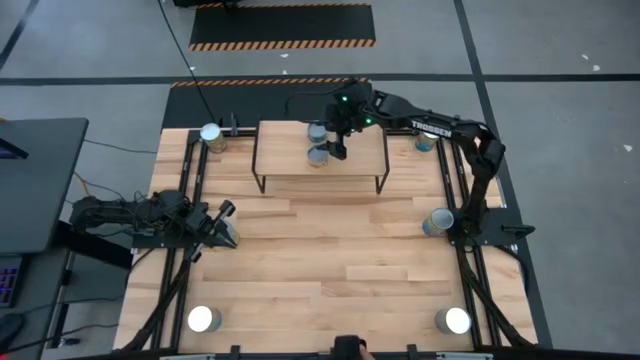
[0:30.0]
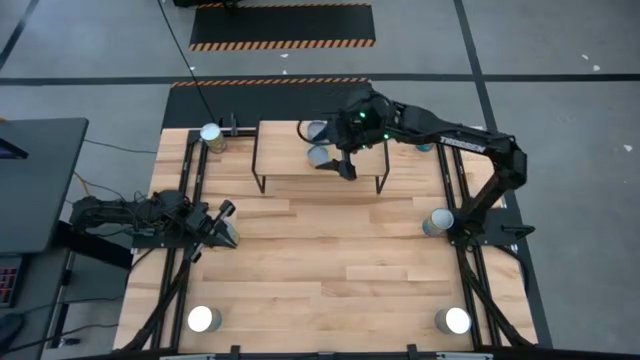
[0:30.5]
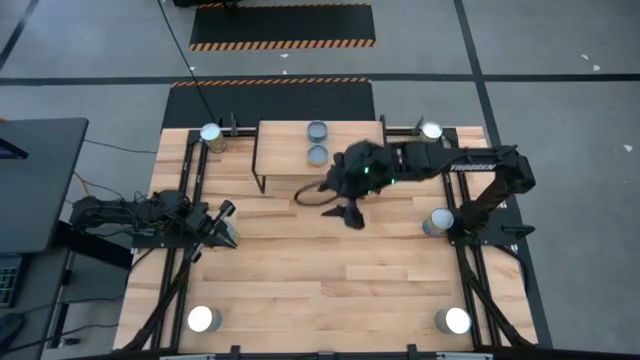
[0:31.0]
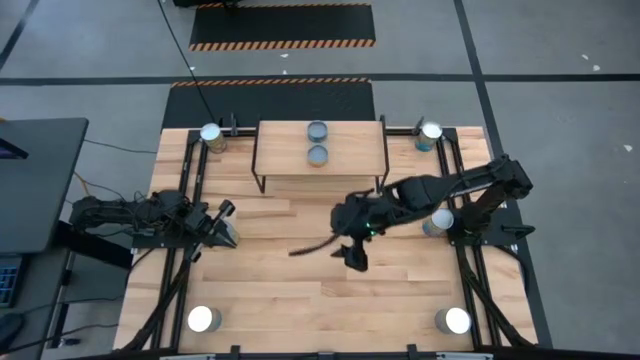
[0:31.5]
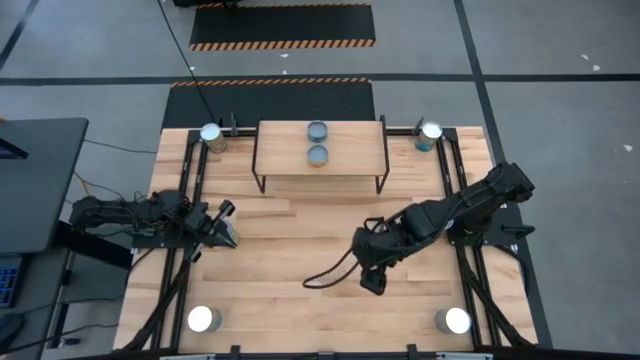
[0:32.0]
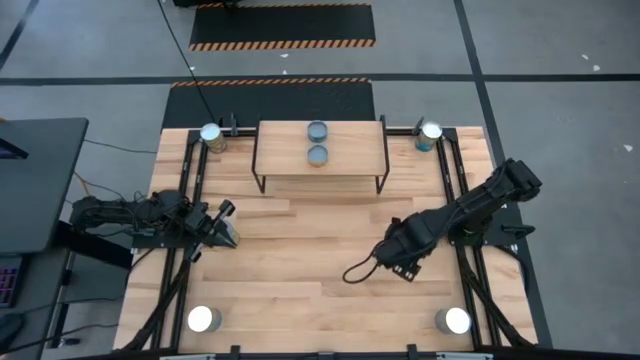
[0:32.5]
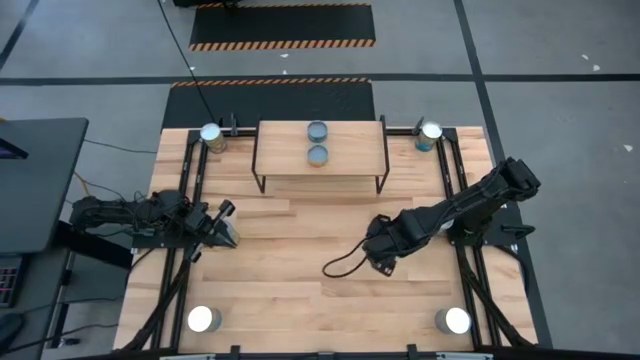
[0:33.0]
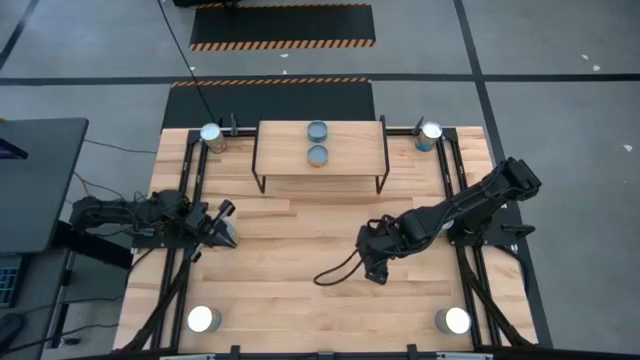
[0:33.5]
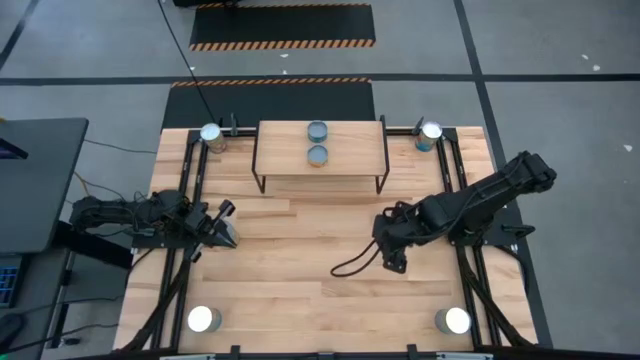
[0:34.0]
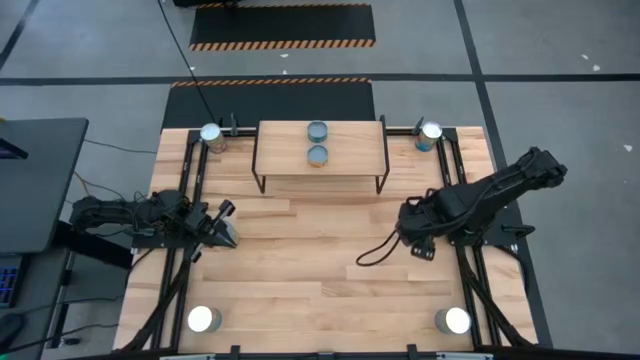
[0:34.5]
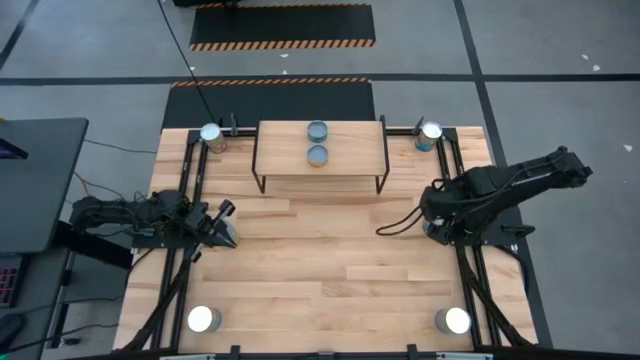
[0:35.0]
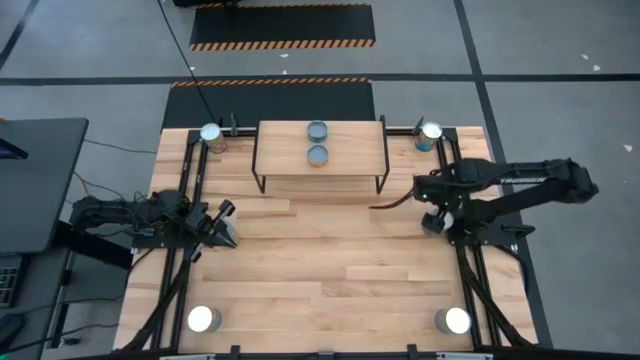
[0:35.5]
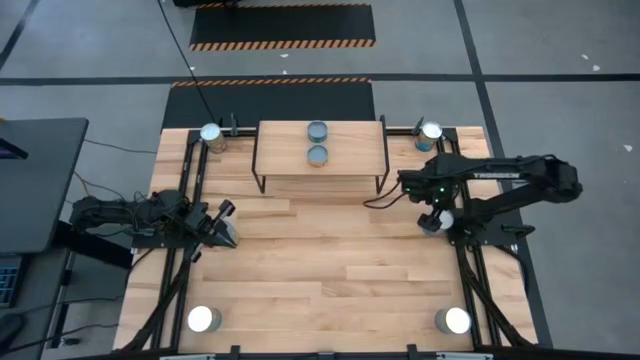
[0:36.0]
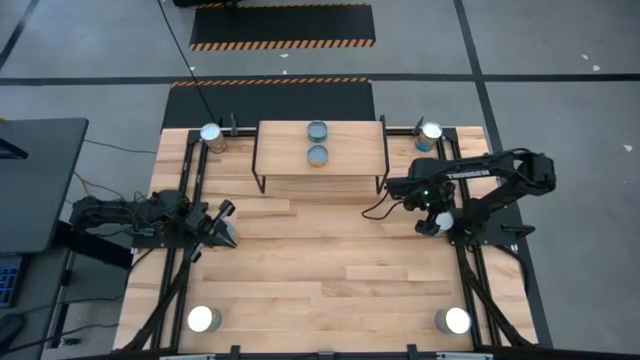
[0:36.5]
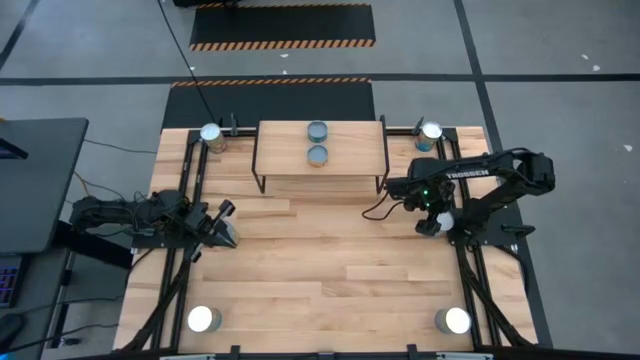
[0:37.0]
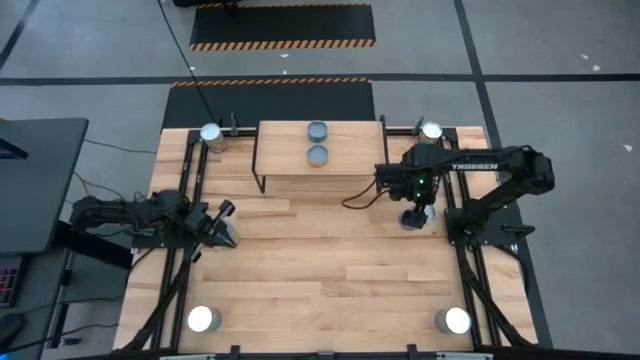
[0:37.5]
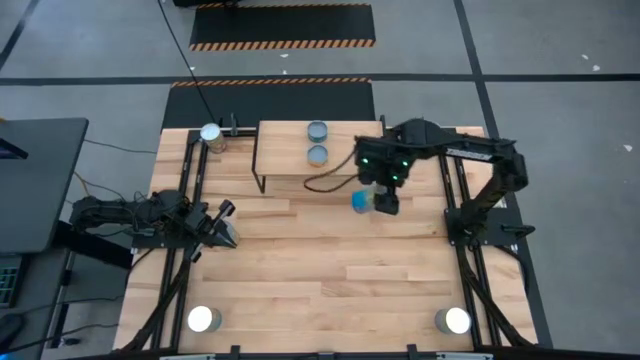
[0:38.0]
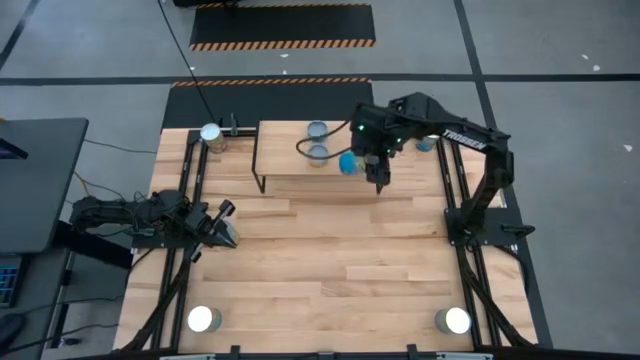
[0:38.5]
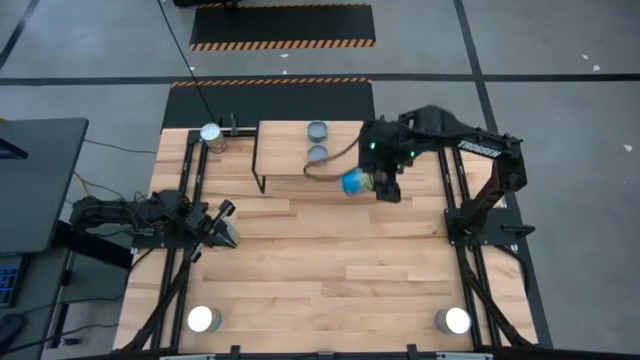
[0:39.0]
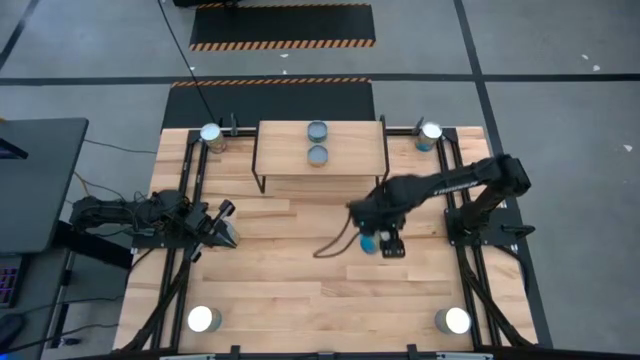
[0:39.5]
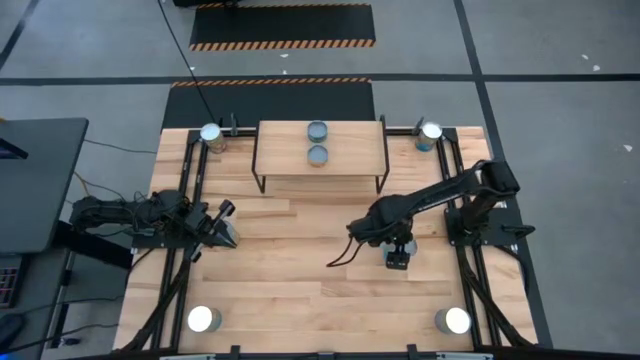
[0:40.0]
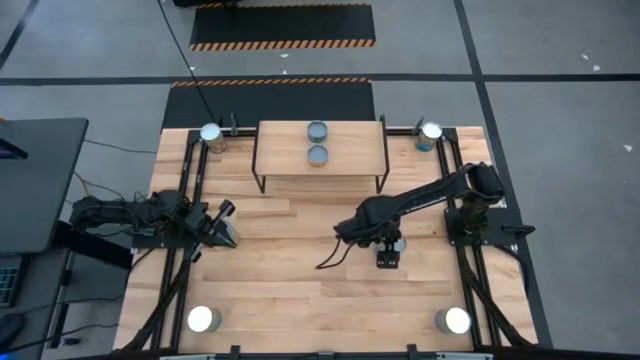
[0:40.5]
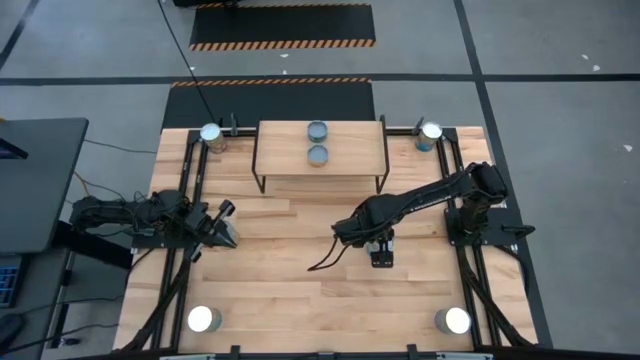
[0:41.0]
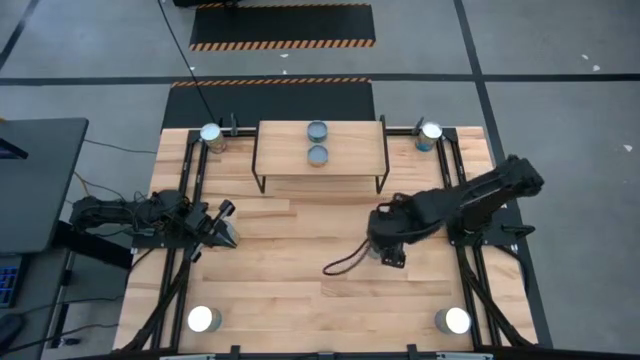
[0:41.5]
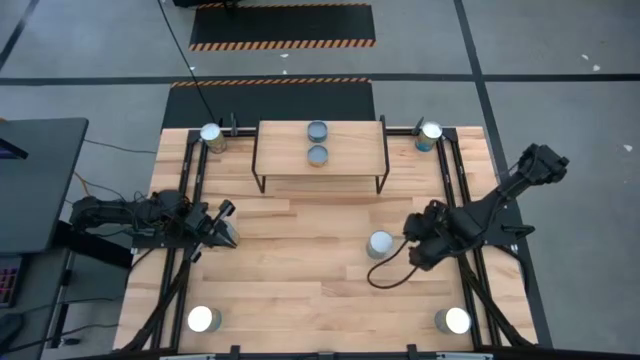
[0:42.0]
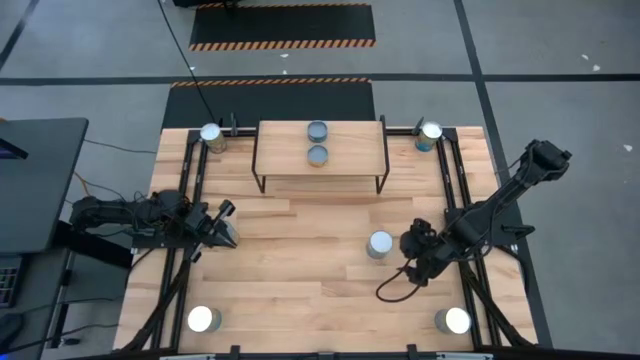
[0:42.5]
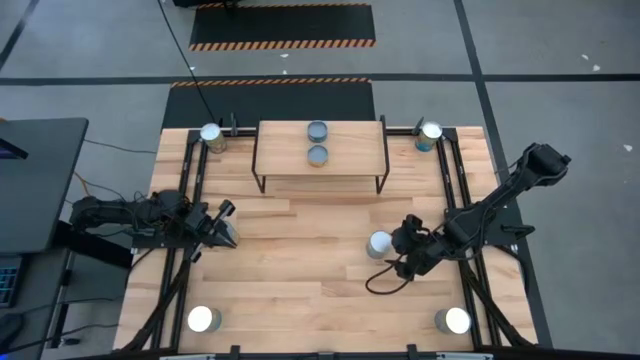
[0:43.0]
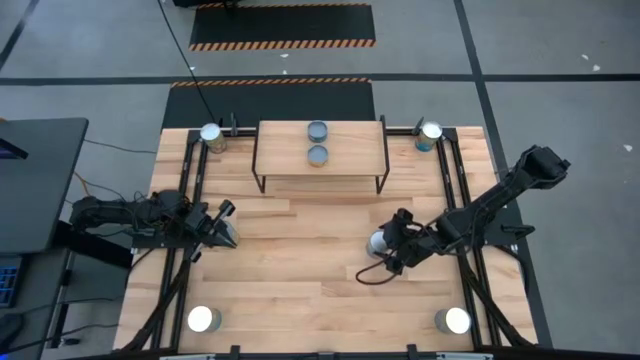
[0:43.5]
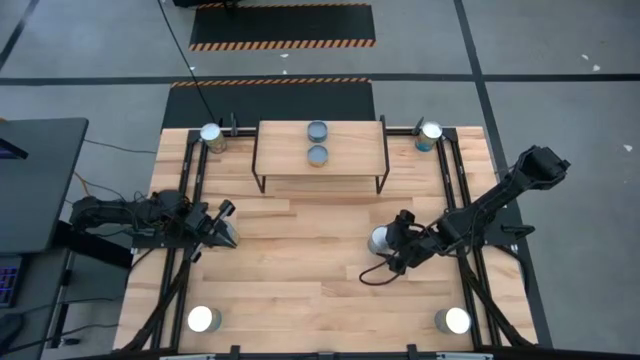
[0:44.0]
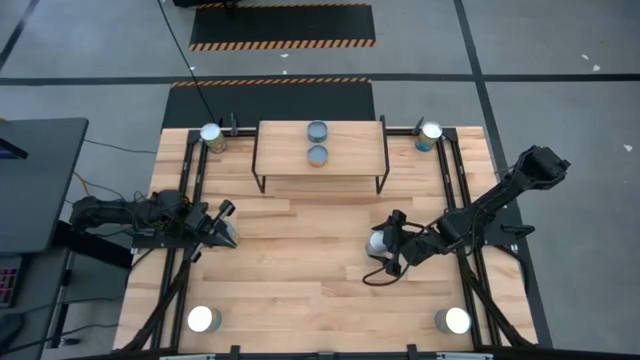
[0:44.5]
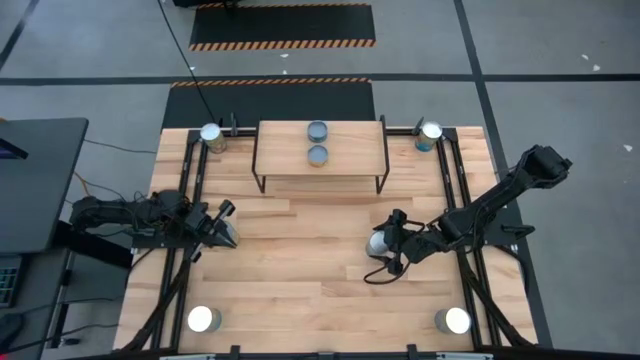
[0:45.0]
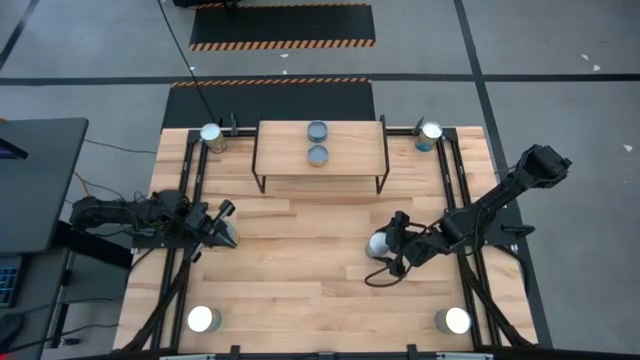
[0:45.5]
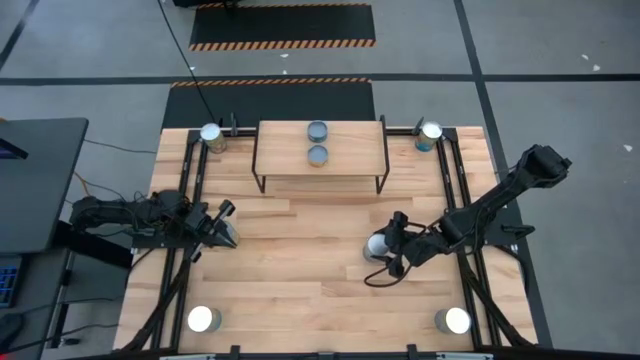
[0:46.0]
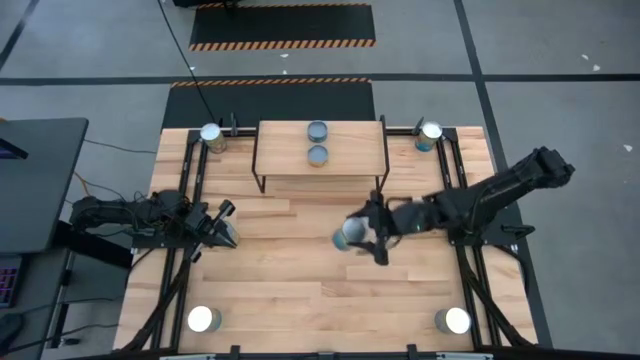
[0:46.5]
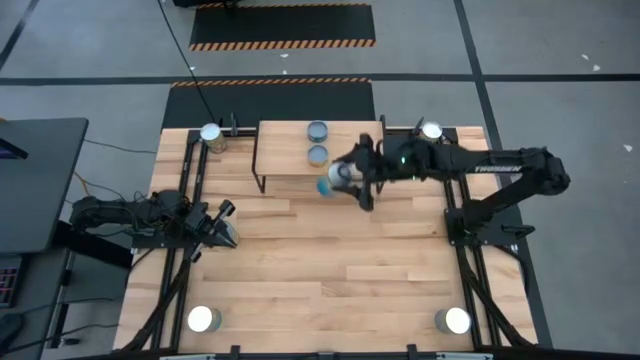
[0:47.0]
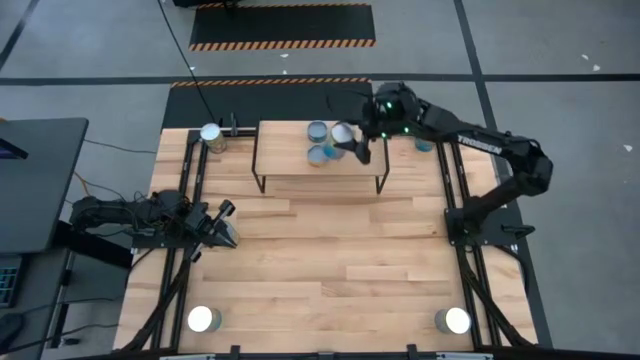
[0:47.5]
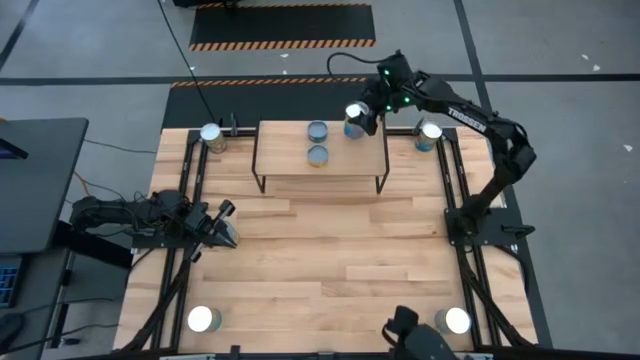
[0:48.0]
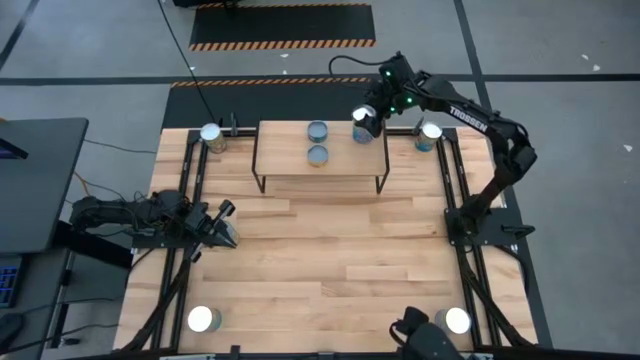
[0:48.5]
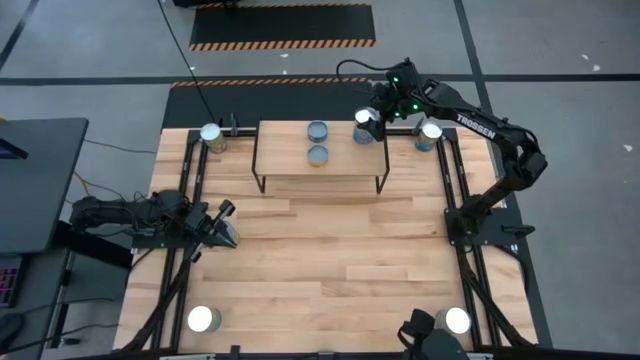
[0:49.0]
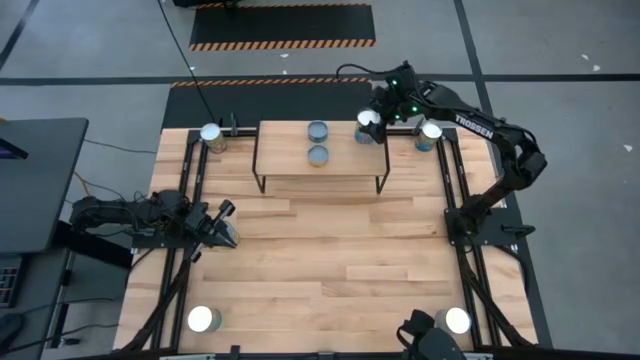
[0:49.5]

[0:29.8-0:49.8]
Task: Pick and place cans onto a shelf
Put the big blue canned cherries on the shelf

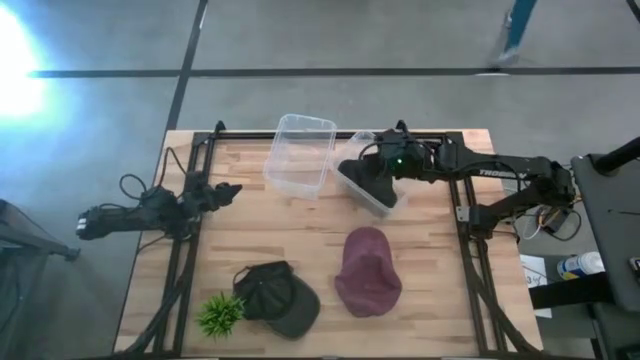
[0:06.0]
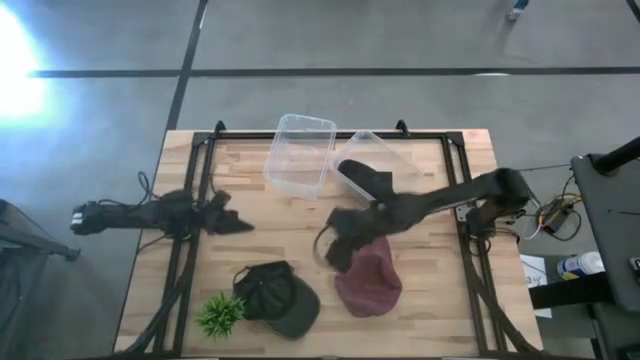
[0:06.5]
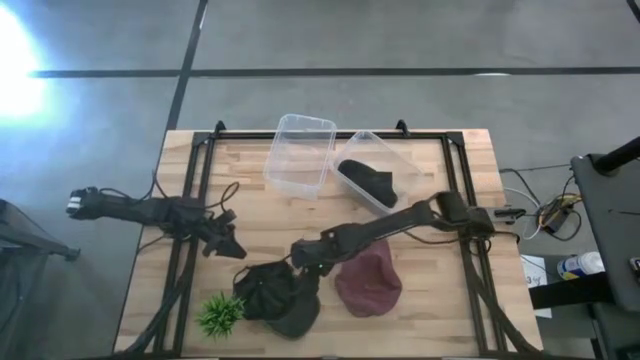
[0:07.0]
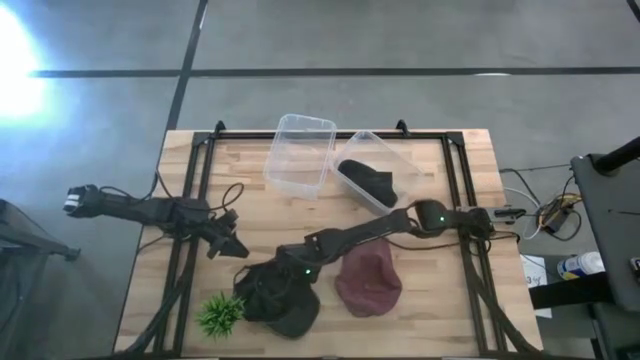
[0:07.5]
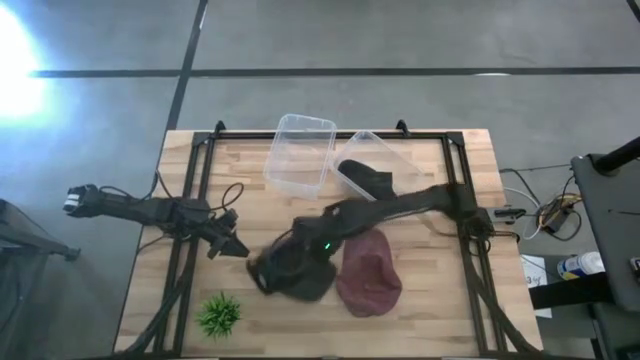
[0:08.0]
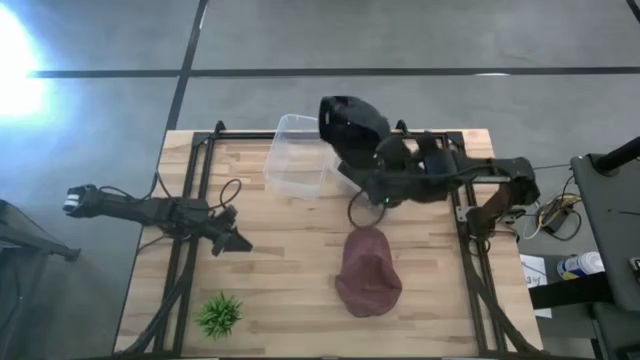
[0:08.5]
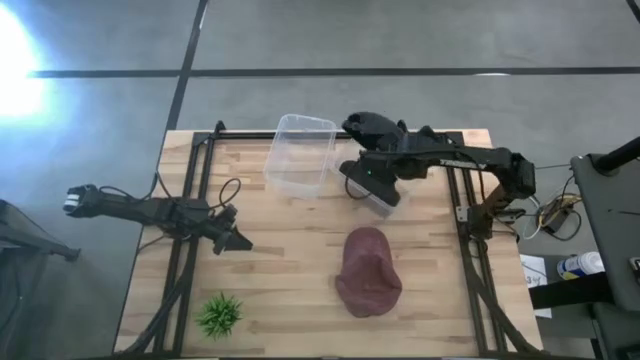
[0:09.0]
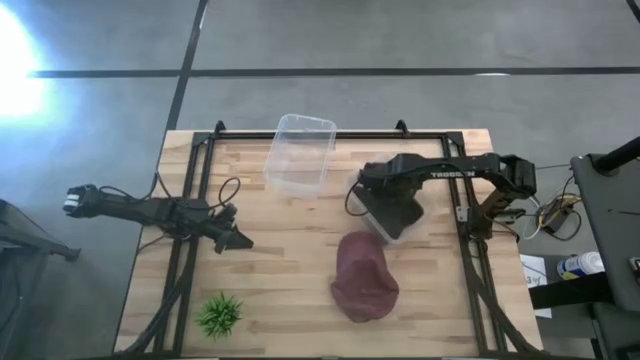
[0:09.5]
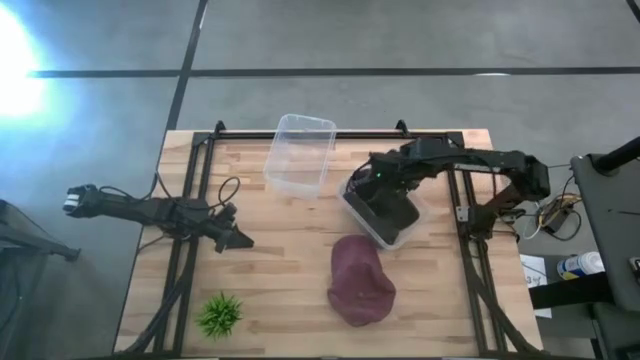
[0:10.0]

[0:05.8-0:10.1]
Task: Pick & Place hat
Put the black cap into the right transparent bin
